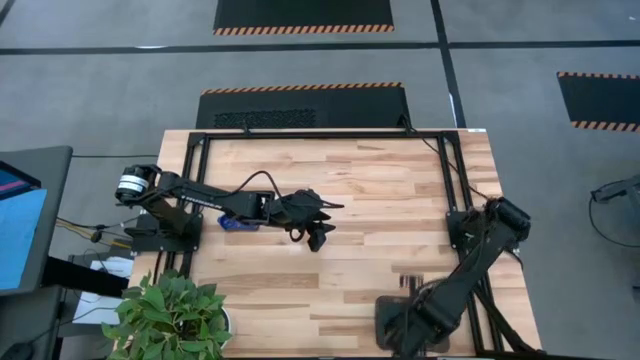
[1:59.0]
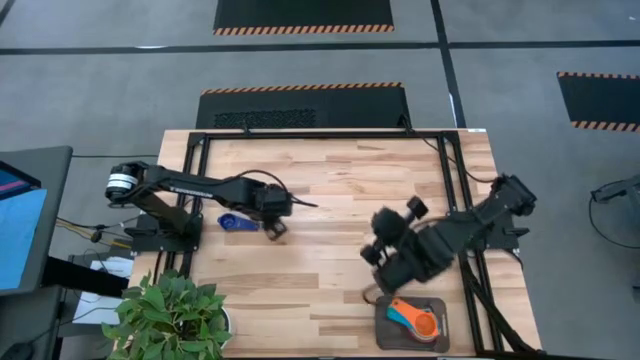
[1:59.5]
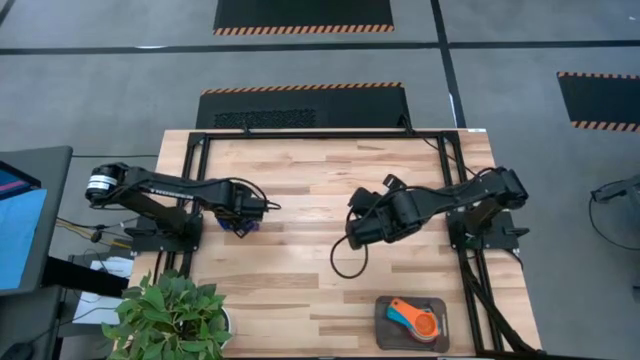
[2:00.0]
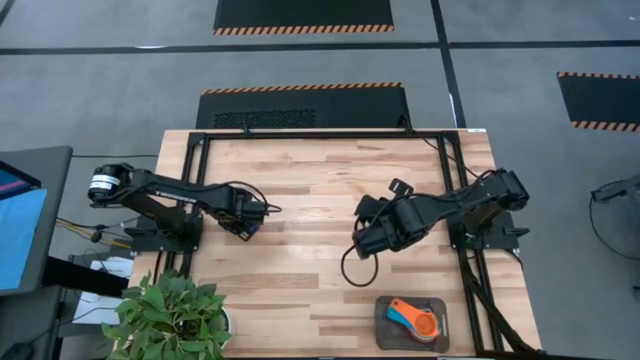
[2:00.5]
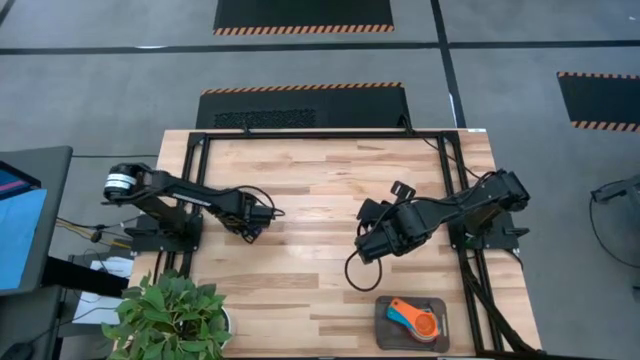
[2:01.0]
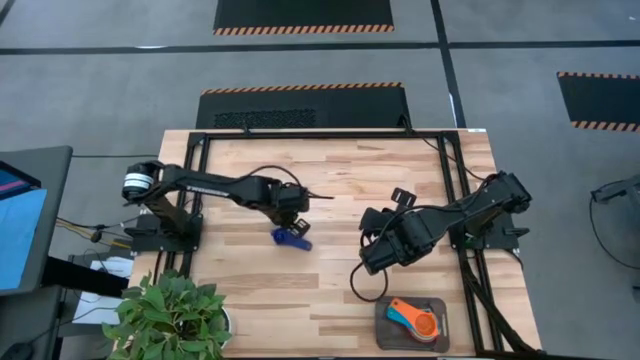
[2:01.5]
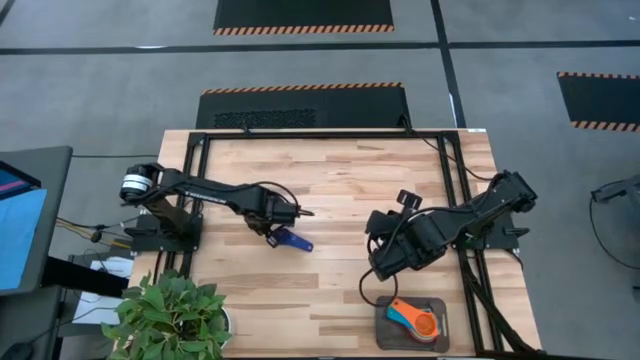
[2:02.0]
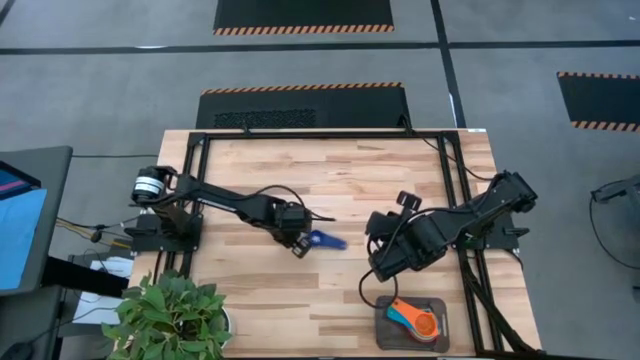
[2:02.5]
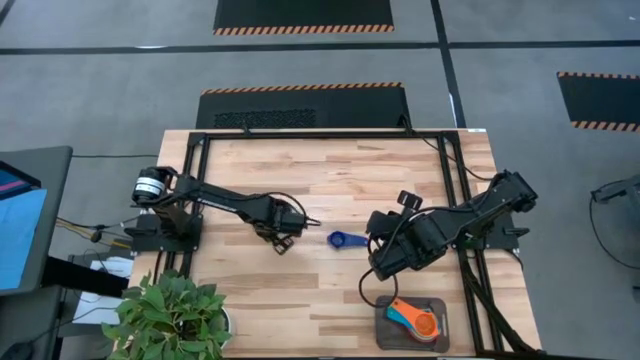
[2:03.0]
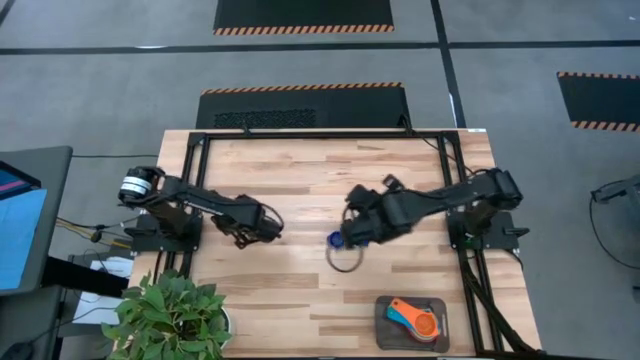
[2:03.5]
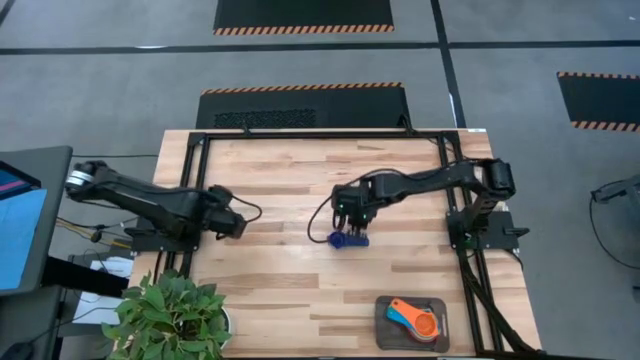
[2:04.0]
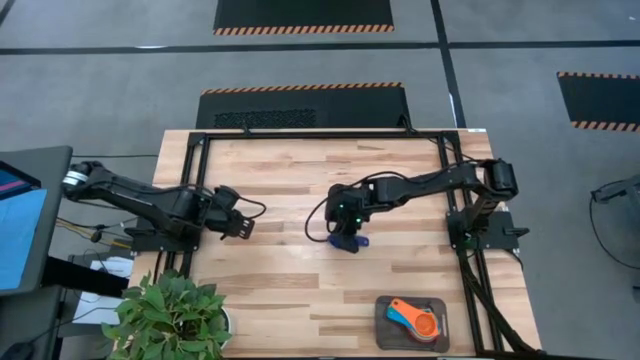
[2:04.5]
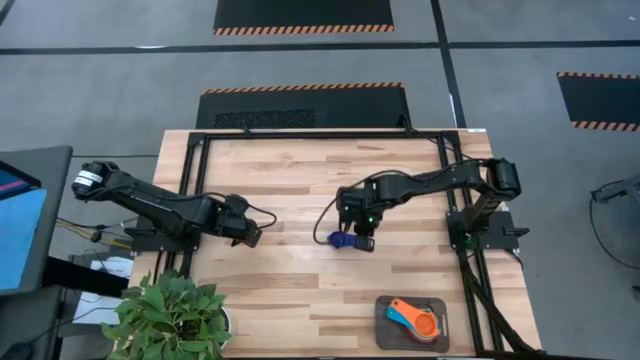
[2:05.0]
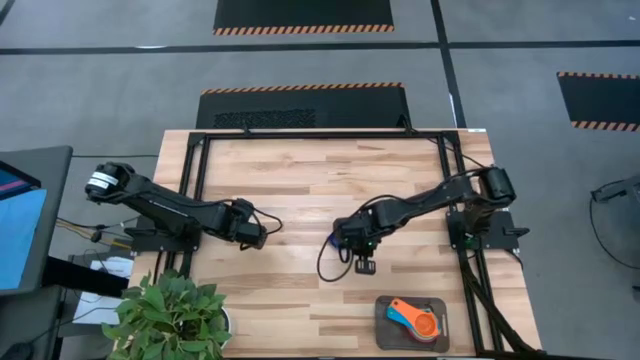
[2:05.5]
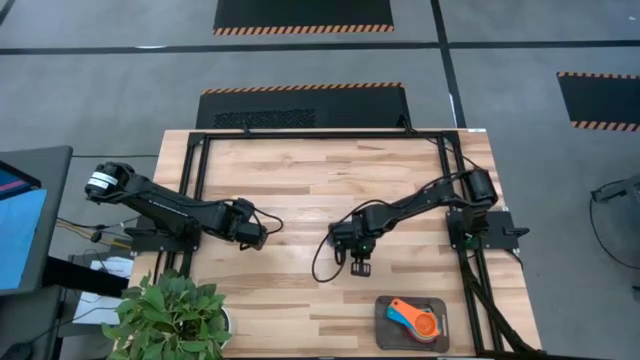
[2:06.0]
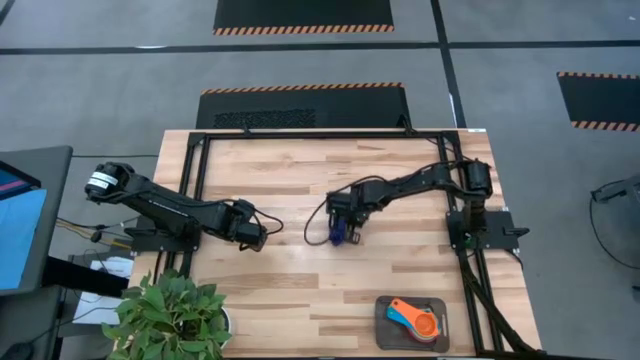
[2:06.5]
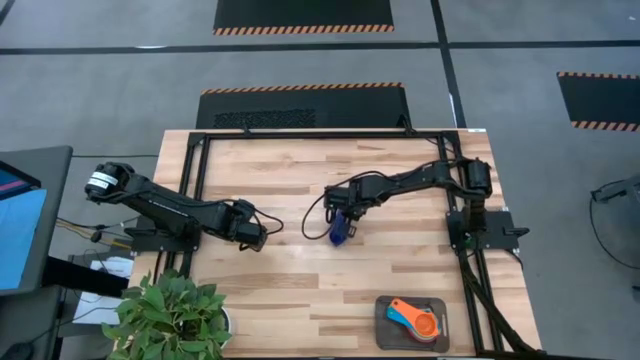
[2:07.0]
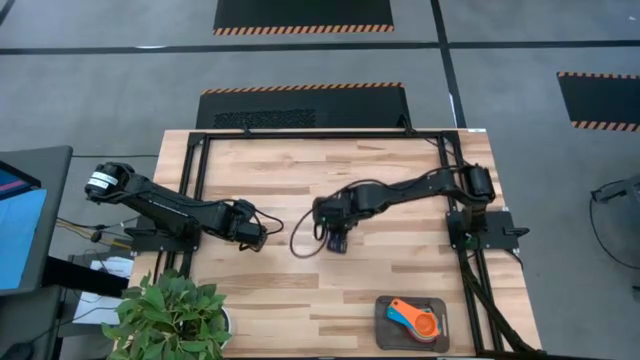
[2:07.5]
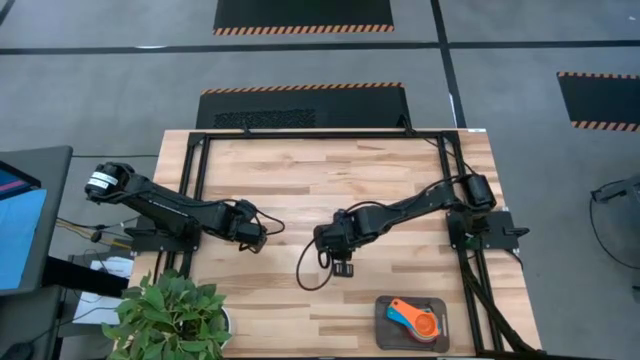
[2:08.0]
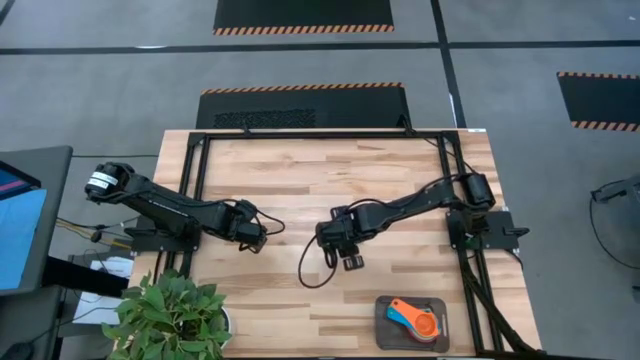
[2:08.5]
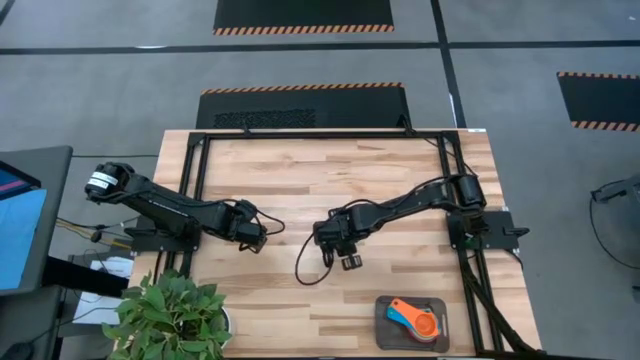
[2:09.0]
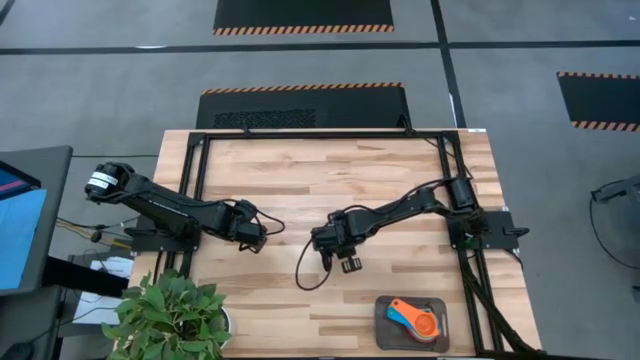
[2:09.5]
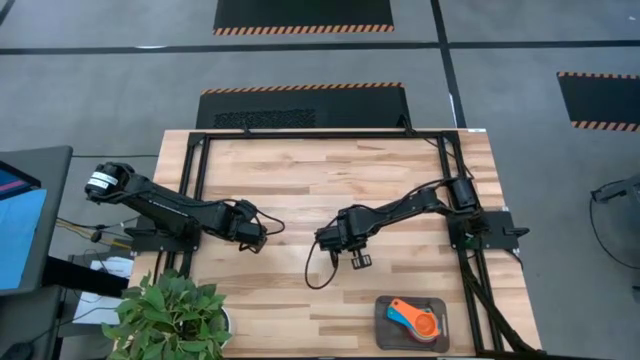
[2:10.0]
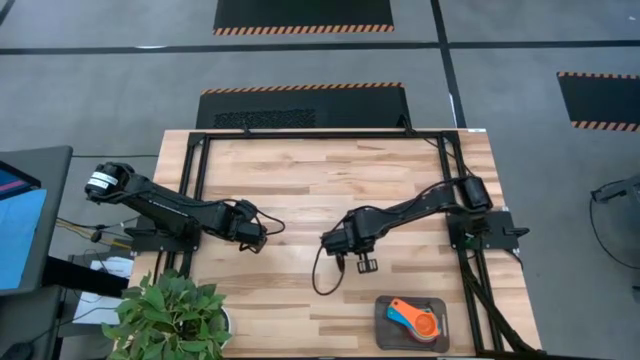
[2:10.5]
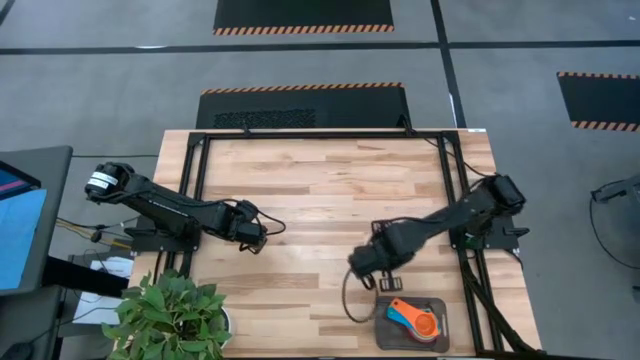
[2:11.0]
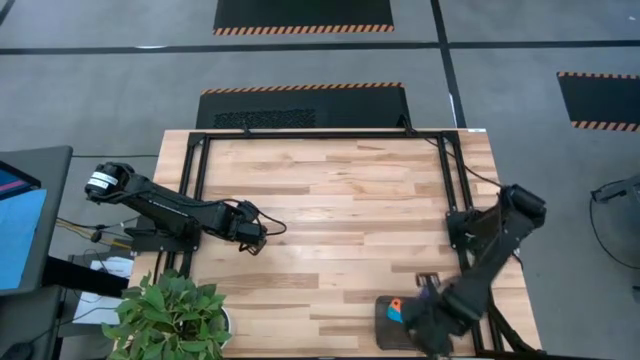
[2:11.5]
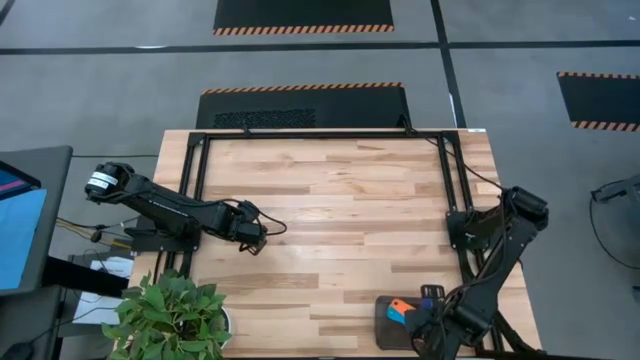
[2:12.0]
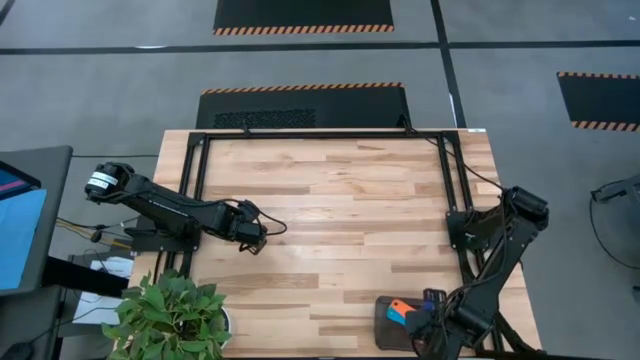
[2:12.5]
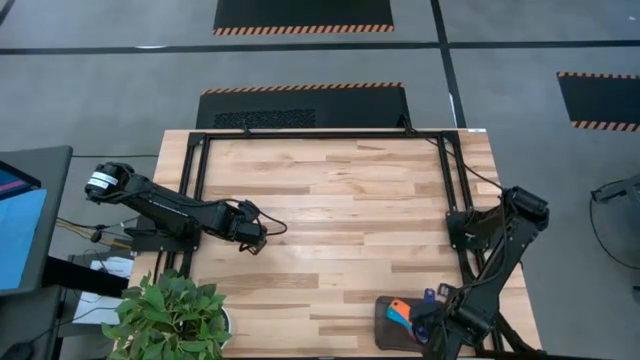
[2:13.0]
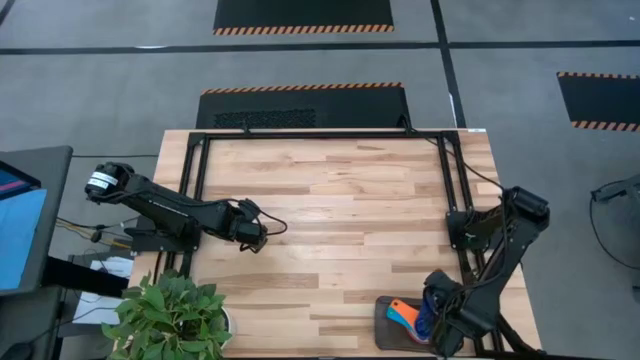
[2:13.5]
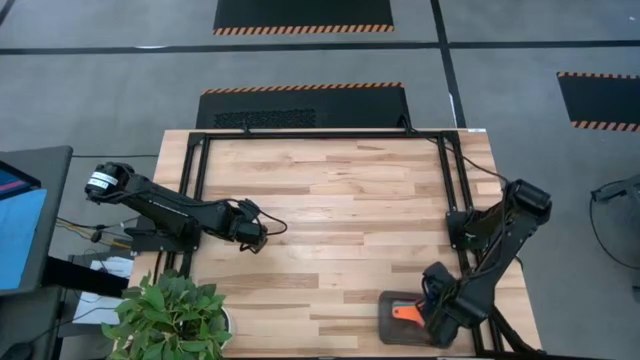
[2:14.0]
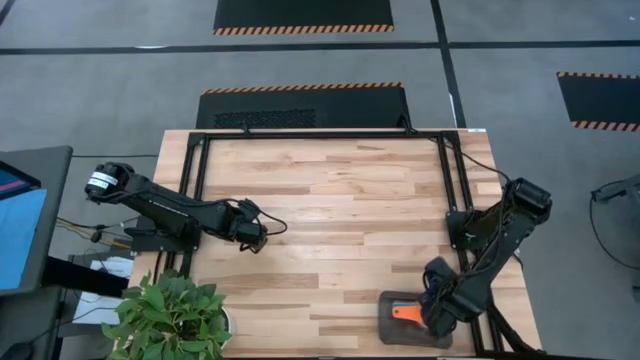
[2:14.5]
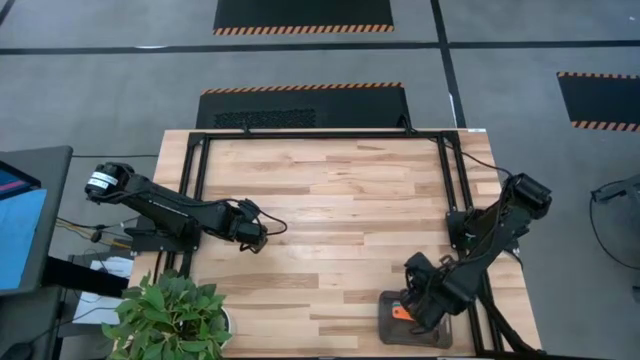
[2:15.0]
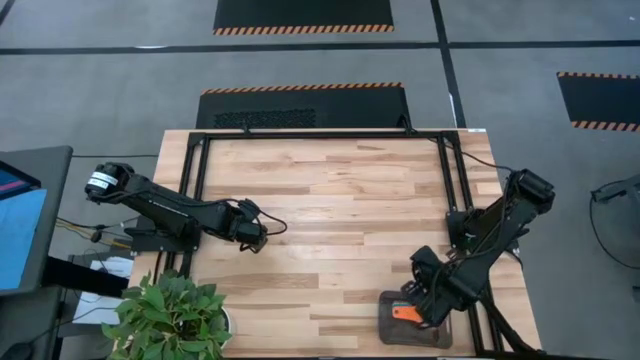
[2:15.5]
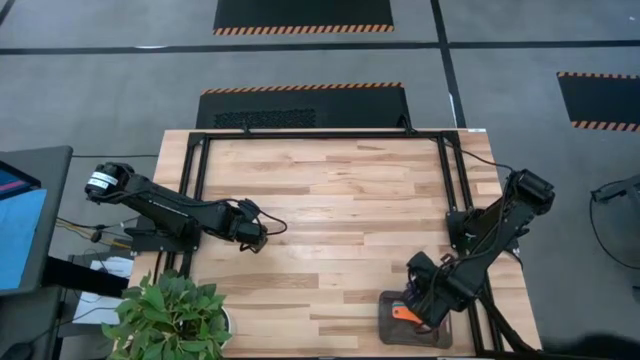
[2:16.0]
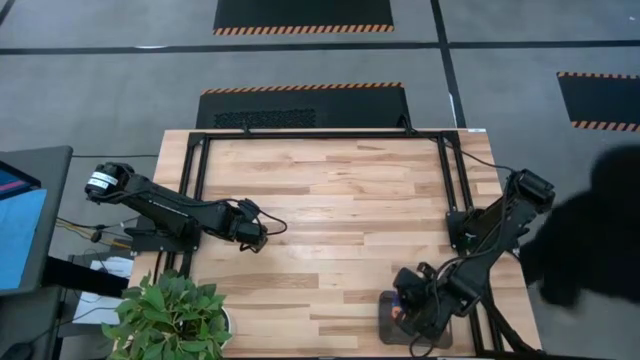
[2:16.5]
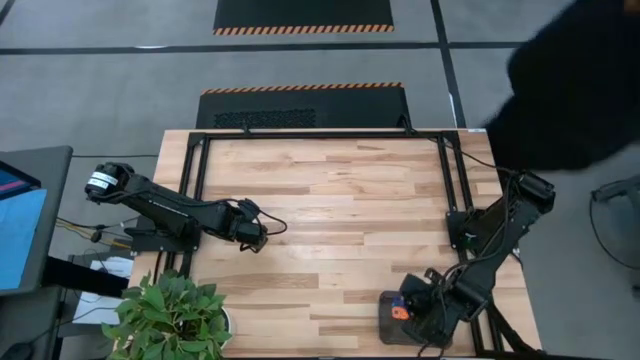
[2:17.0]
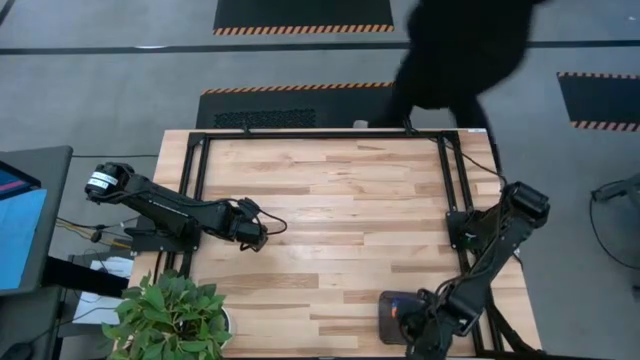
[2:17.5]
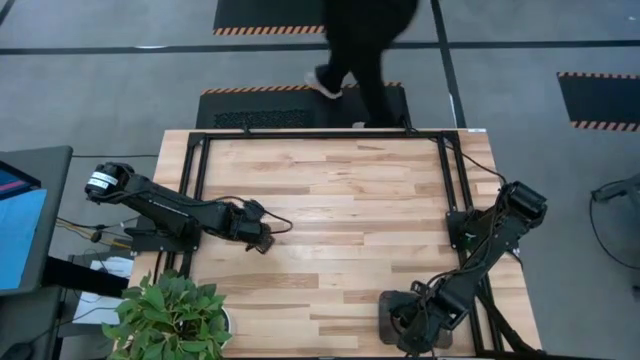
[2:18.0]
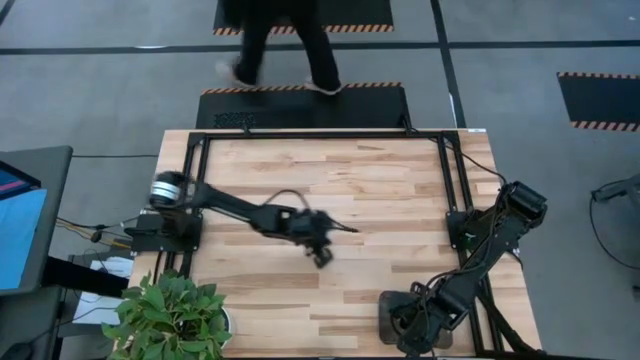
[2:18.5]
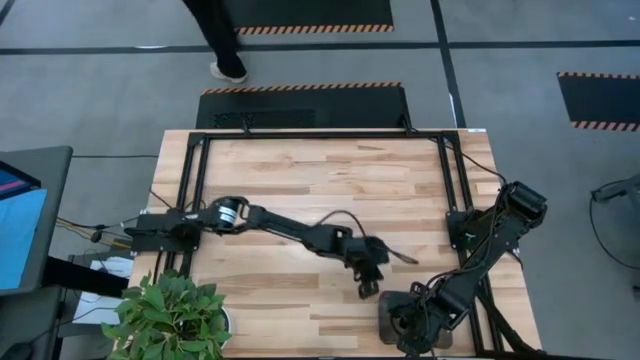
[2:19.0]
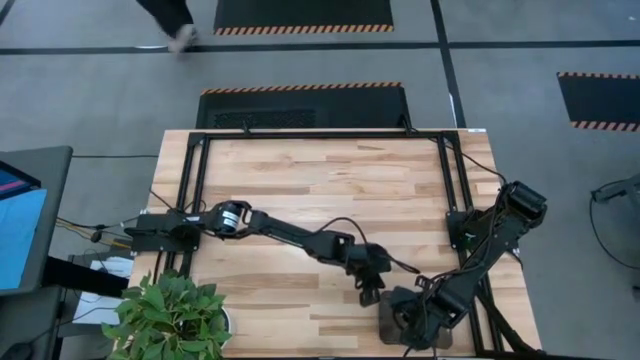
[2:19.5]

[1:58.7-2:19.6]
Task: Nest measuring cups in basket
Stack the purple measuring cup on top of the orange measuring cup in the black bin
